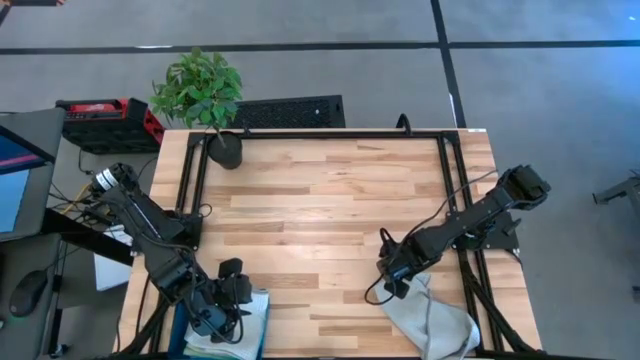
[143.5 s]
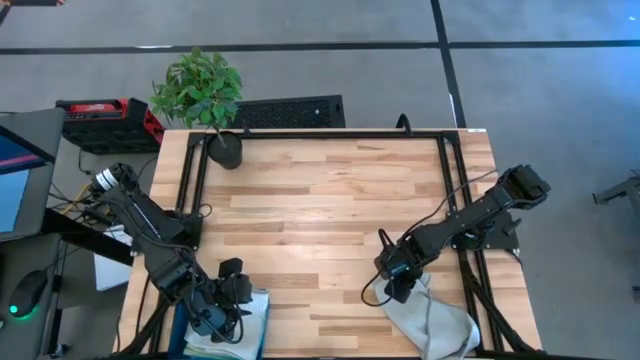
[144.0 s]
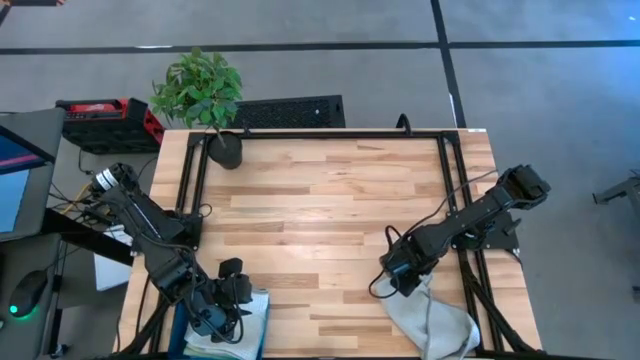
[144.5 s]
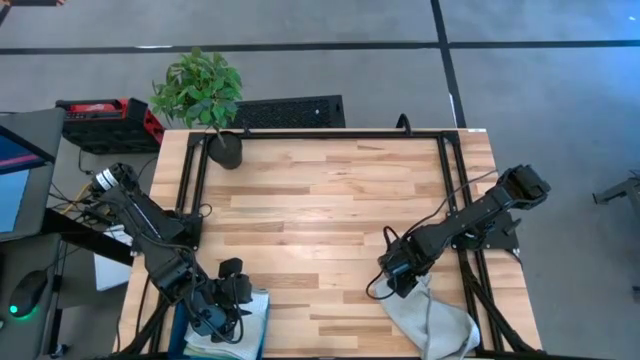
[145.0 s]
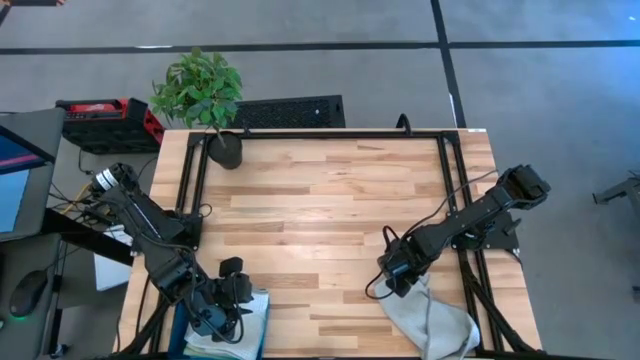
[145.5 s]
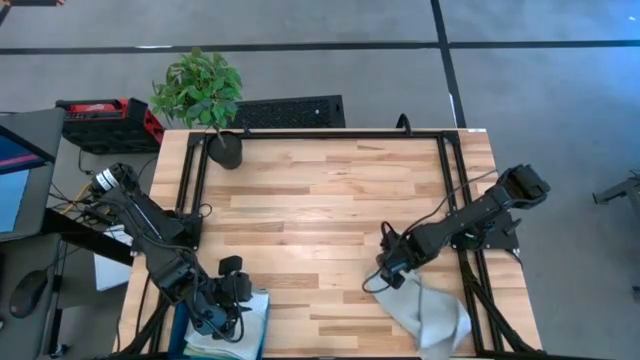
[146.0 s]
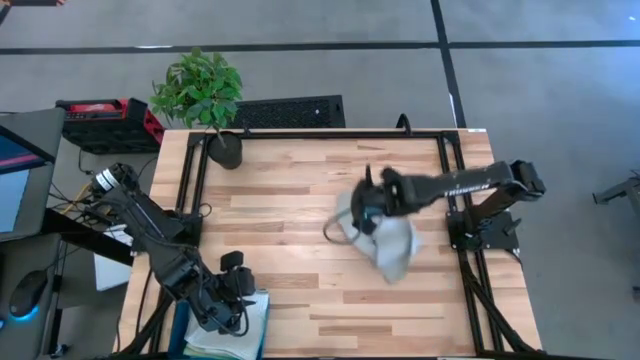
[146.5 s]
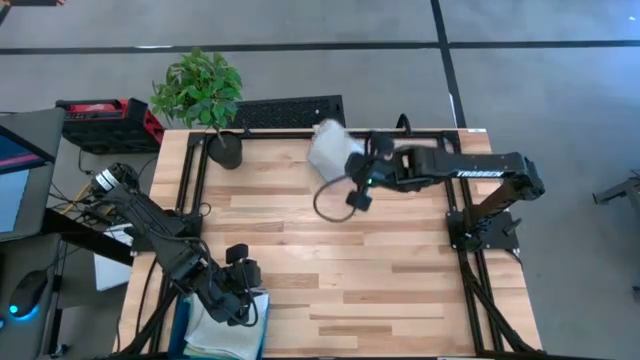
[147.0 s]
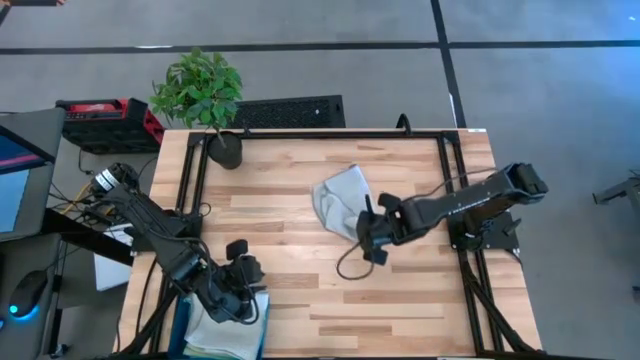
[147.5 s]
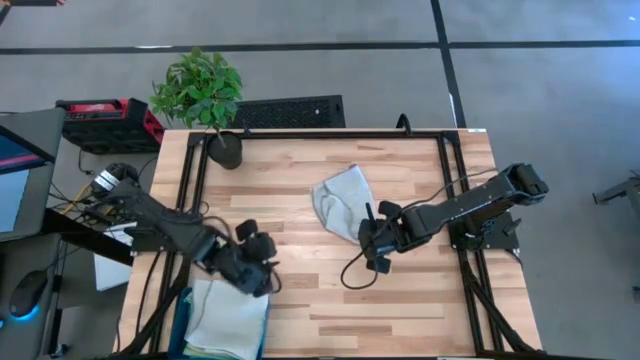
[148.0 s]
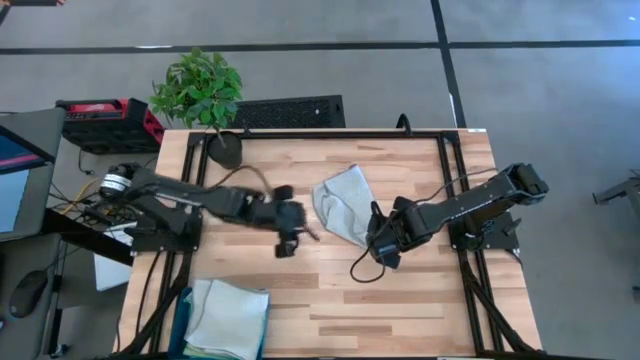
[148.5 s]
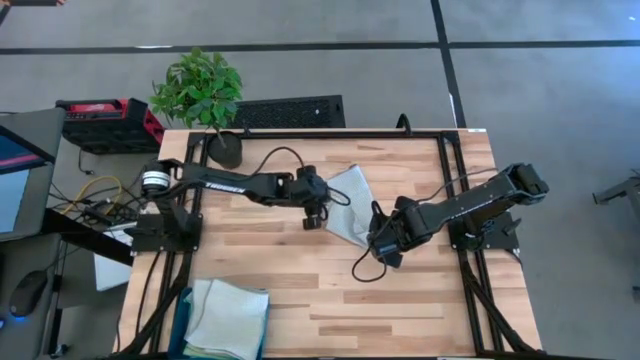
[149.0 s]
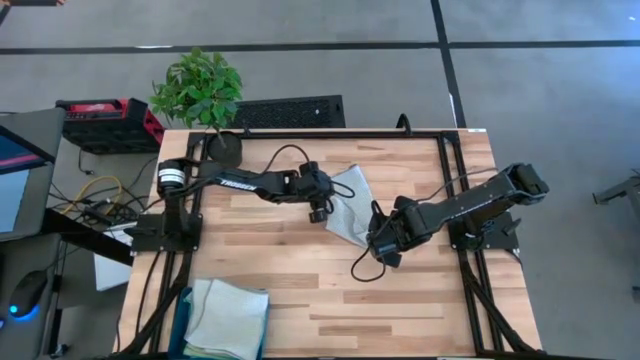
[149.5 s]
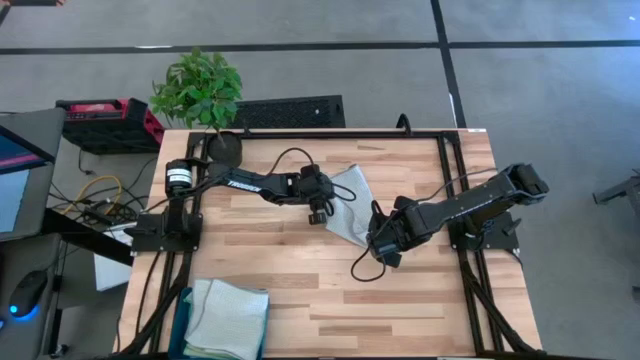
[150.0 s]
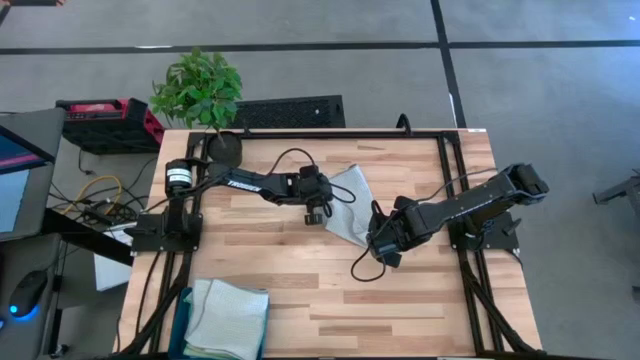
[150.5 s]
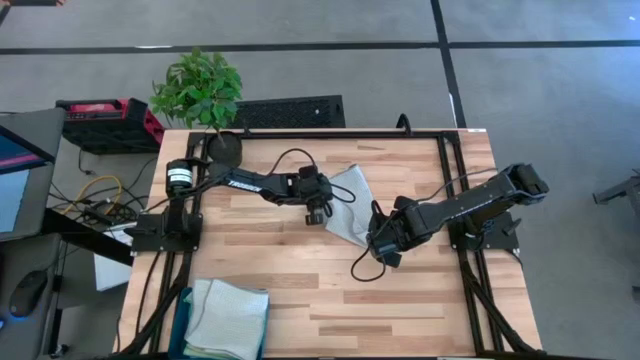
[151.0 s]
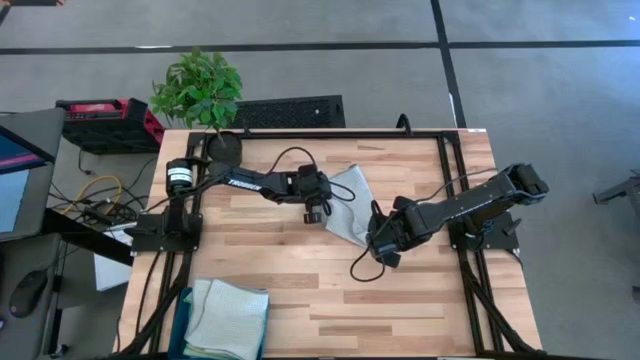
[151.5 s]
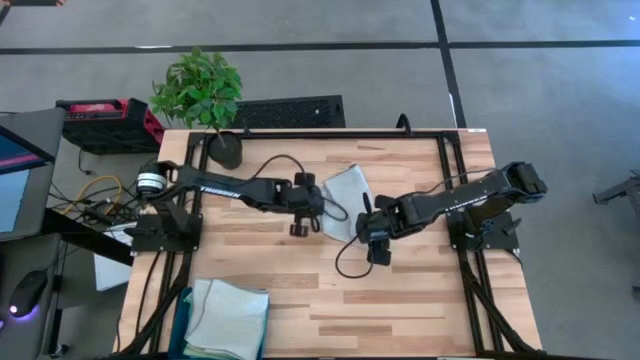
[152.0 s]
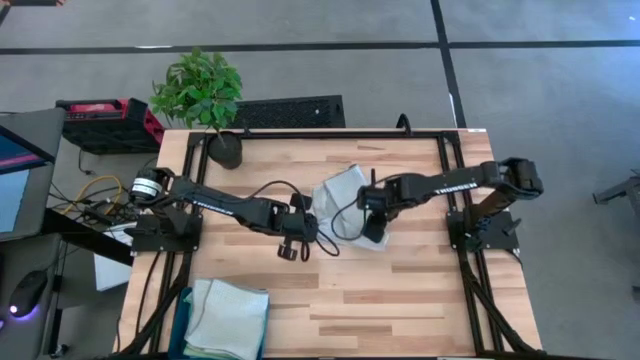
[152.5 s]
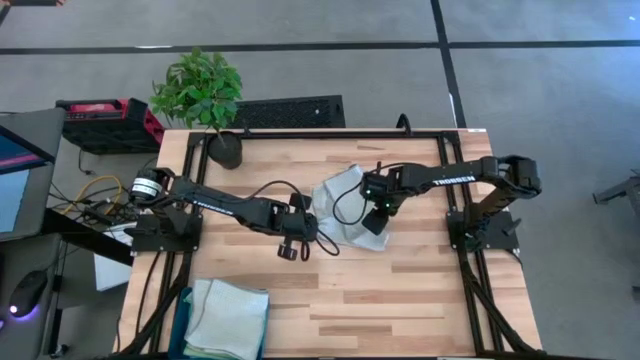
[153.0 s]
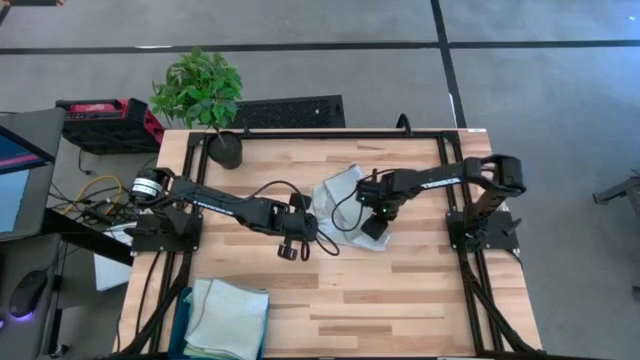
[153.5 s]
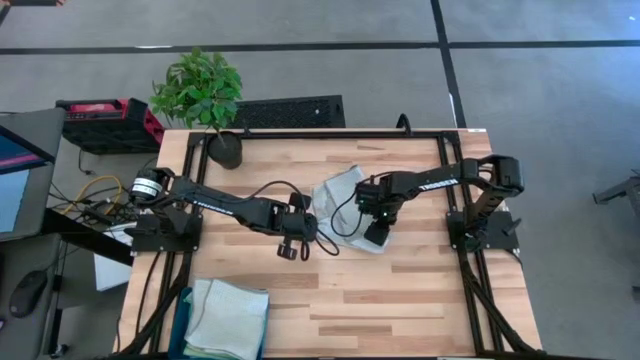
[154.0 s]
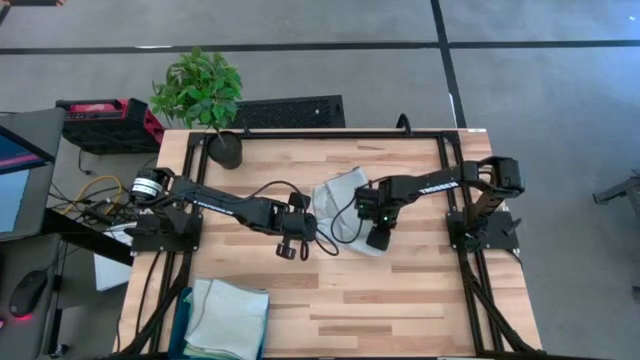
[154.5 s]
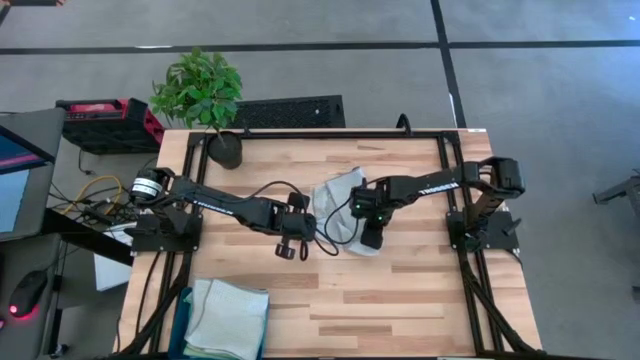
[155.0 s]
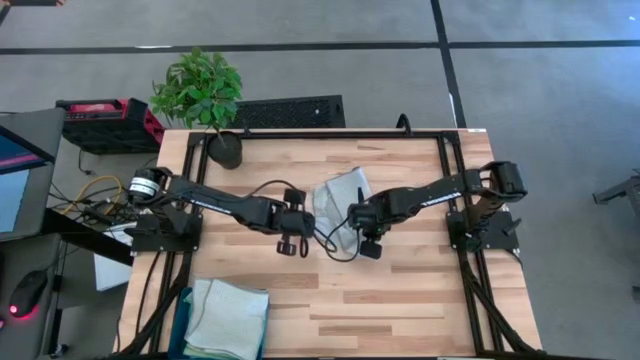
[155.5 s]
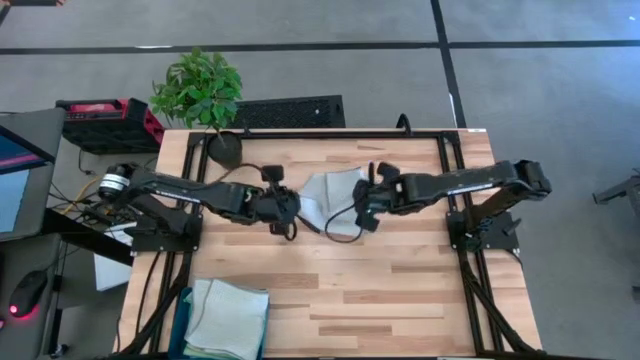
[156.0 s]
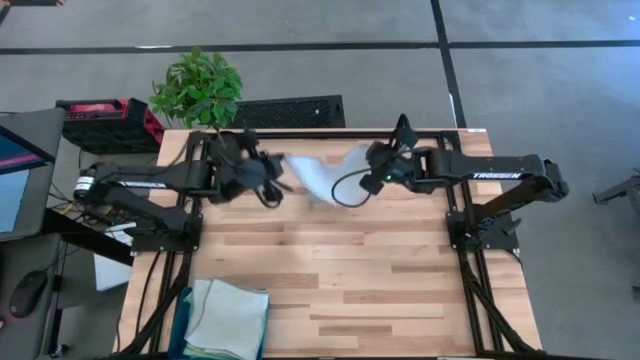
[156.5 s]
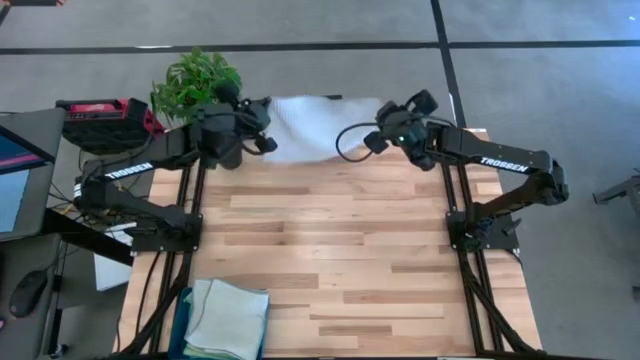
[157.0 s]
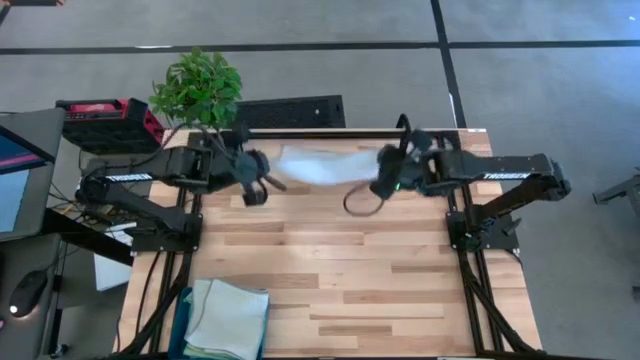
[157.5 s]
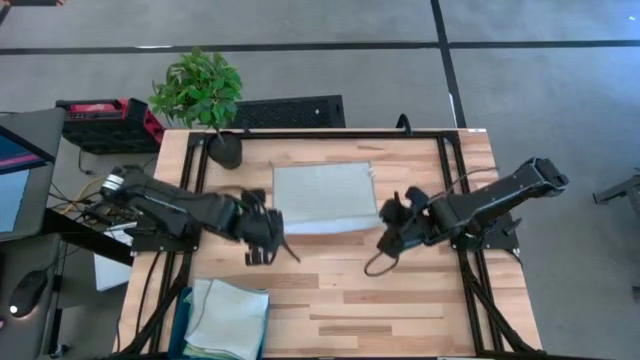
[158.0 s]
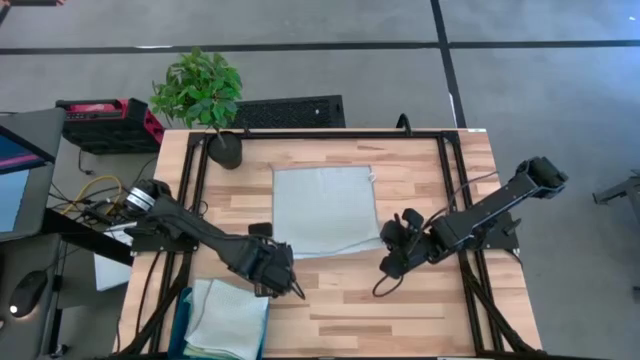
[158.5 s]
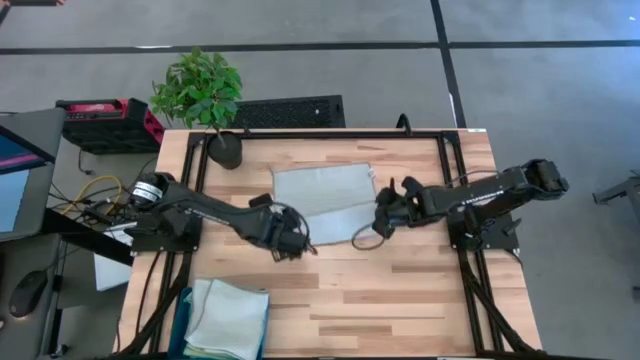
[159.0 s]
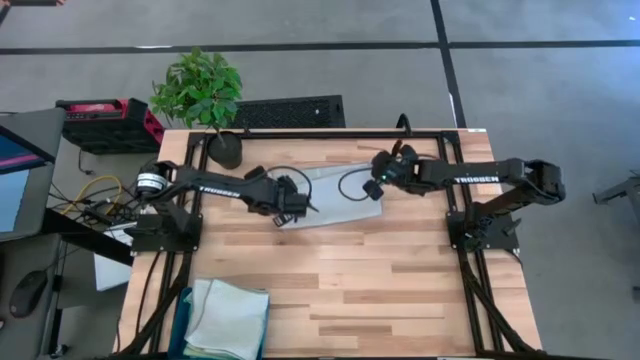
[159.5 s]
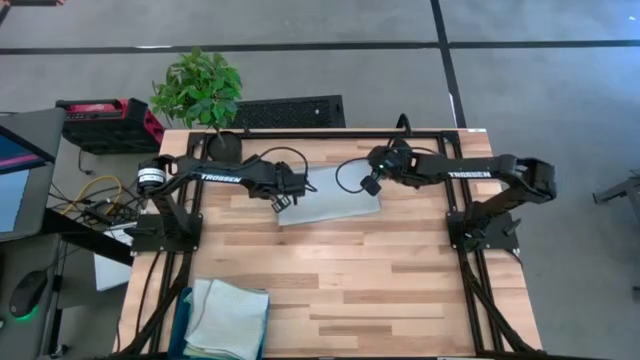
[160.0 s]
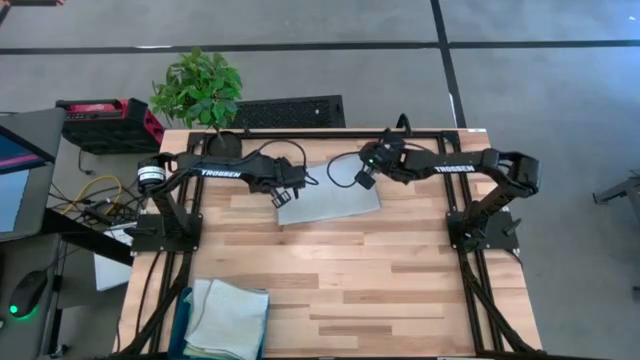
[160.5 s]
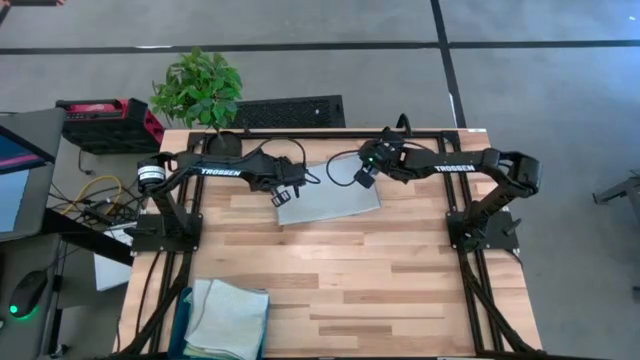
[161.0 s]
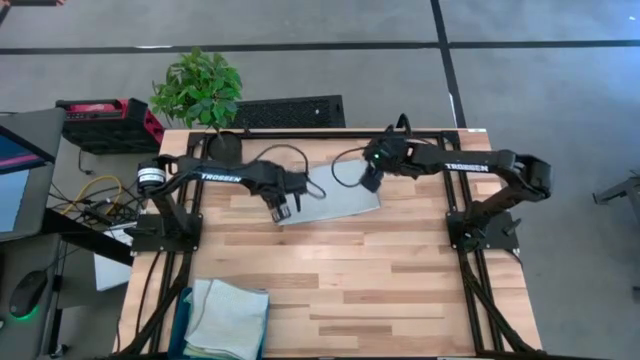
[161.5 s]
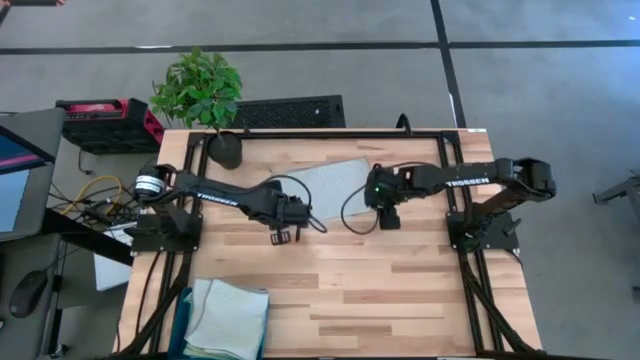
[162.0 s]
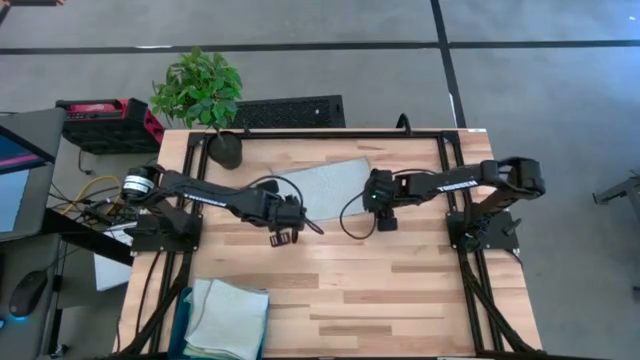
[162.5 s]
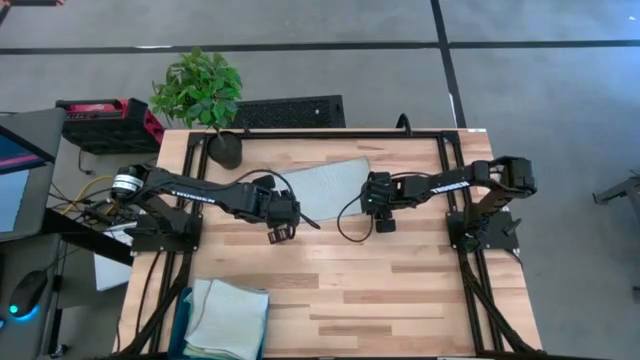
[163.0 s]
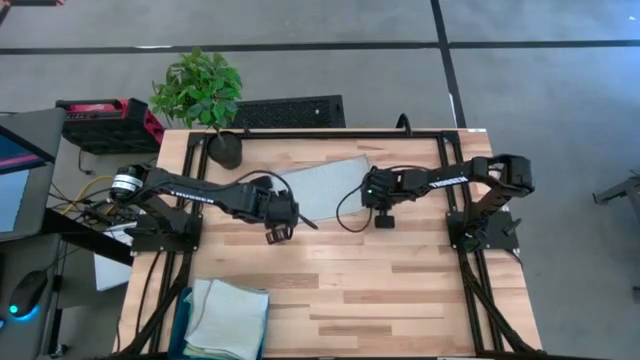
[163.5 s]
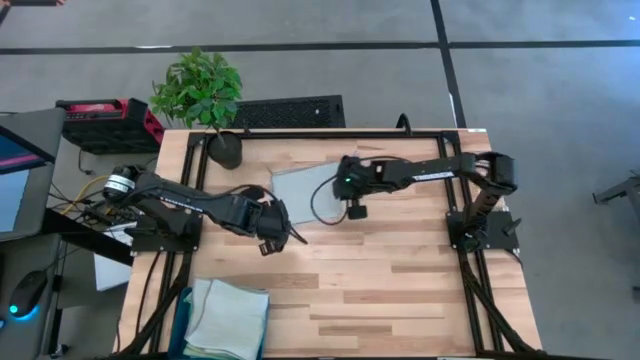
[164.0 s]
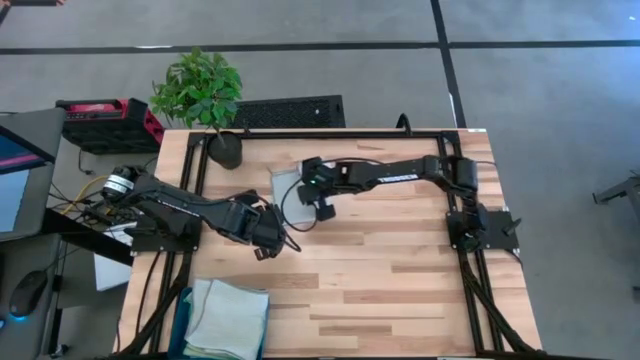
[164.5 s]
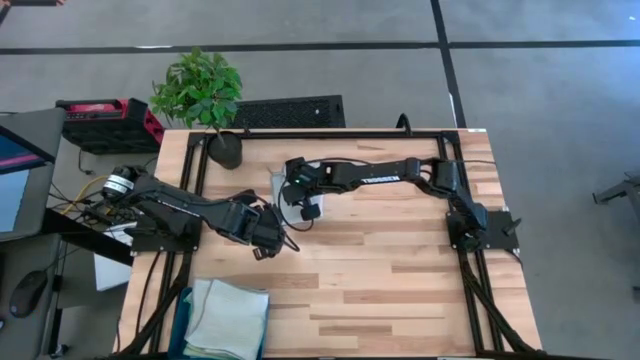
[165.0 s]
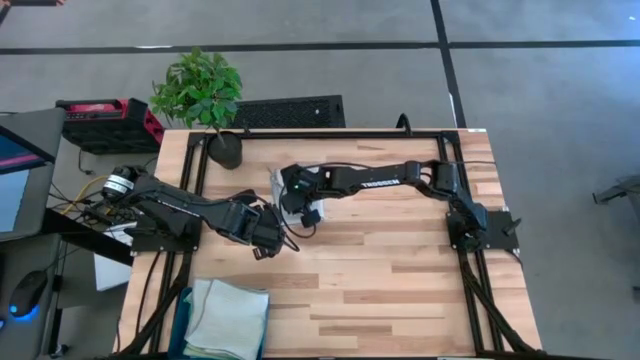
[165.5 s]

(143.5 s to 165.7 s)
Task: Fold microfiber towels
Fold the grey microfiber cloth
